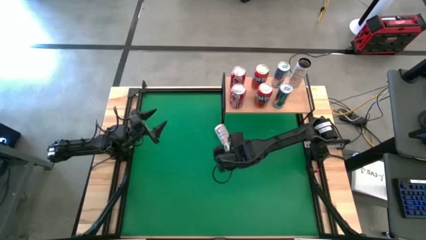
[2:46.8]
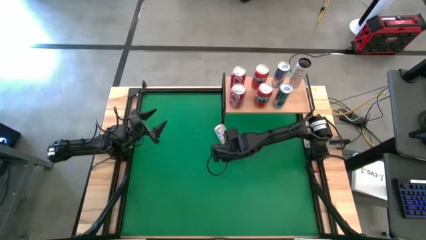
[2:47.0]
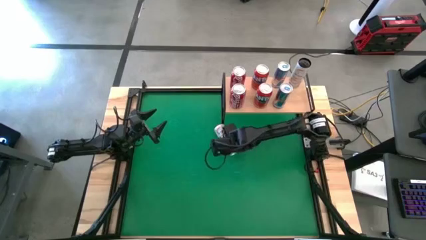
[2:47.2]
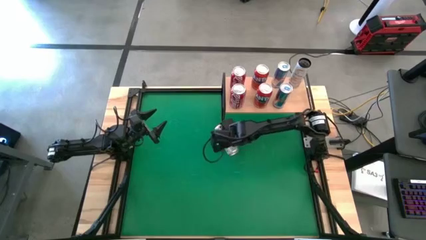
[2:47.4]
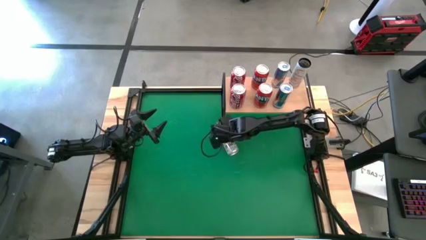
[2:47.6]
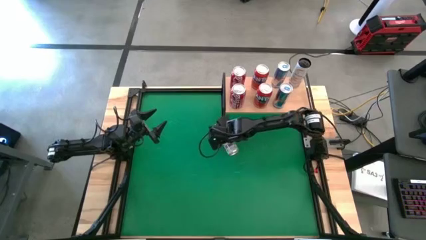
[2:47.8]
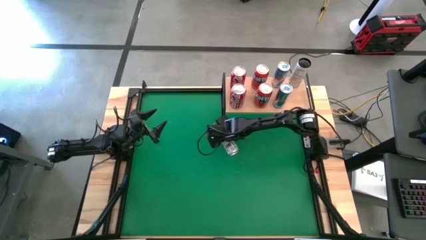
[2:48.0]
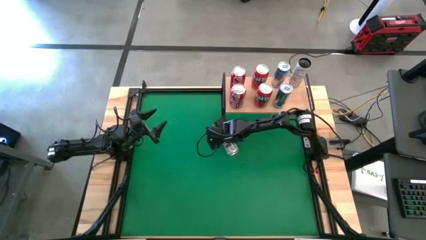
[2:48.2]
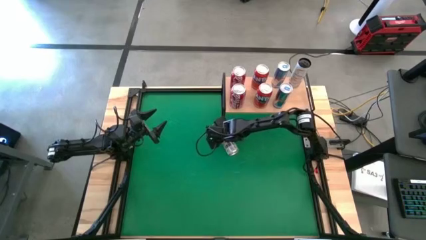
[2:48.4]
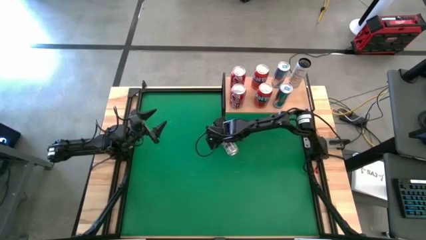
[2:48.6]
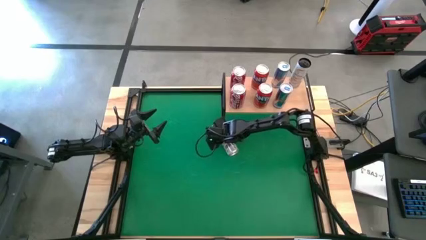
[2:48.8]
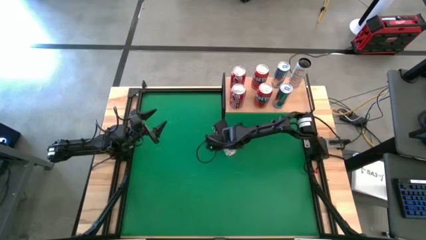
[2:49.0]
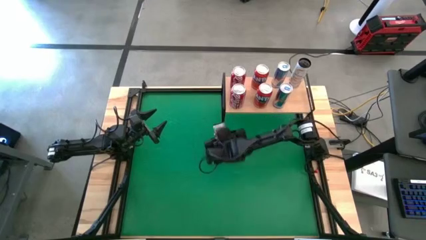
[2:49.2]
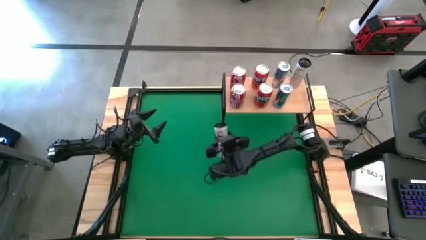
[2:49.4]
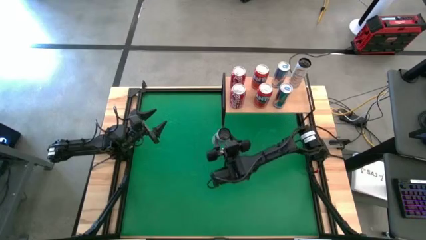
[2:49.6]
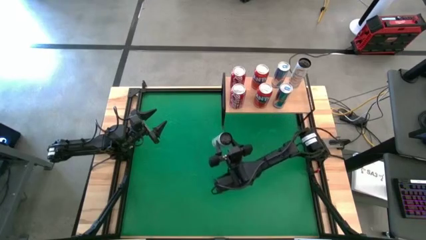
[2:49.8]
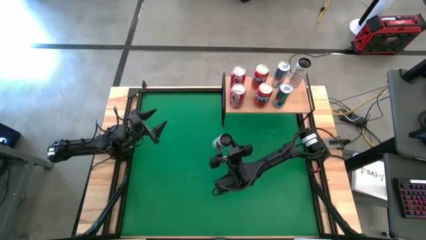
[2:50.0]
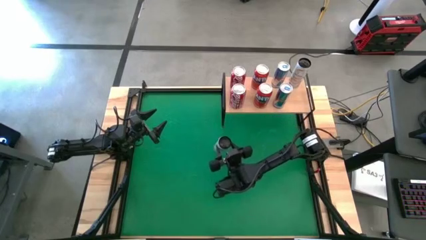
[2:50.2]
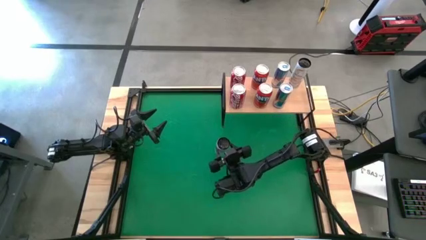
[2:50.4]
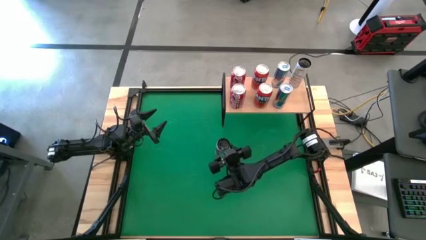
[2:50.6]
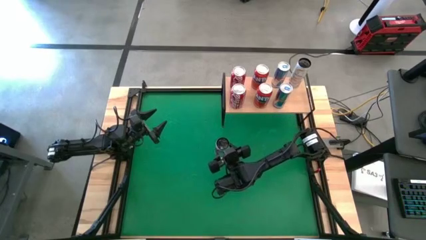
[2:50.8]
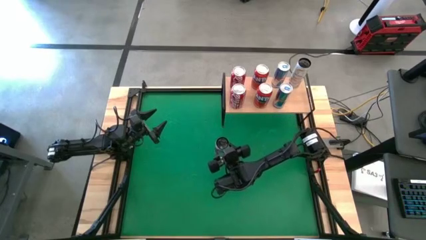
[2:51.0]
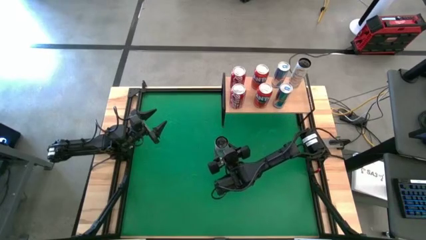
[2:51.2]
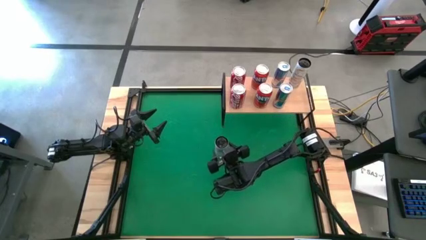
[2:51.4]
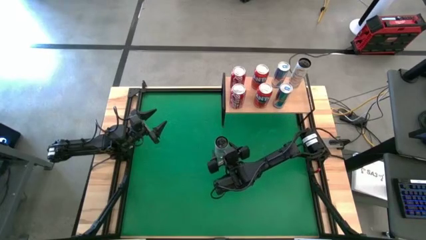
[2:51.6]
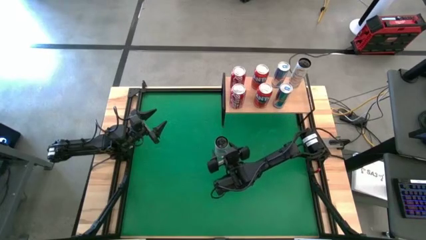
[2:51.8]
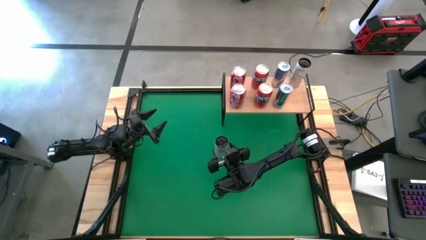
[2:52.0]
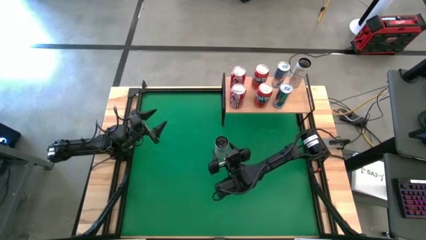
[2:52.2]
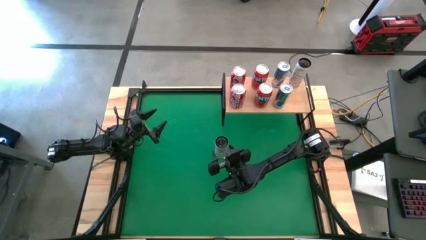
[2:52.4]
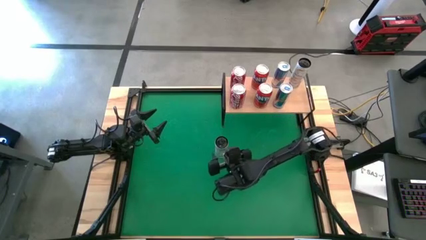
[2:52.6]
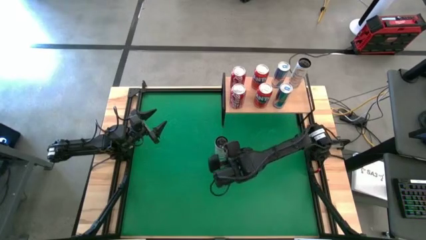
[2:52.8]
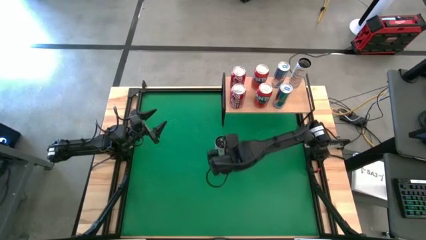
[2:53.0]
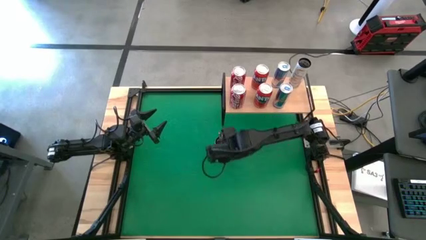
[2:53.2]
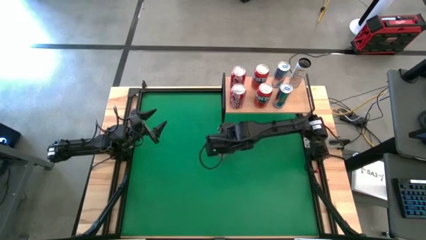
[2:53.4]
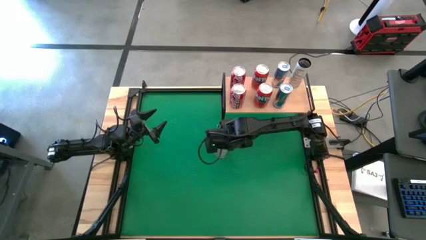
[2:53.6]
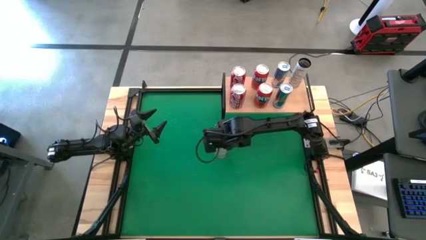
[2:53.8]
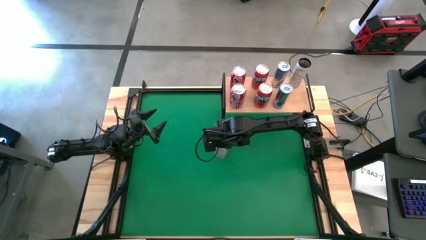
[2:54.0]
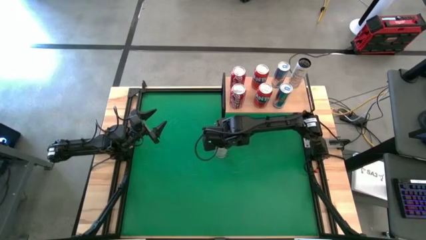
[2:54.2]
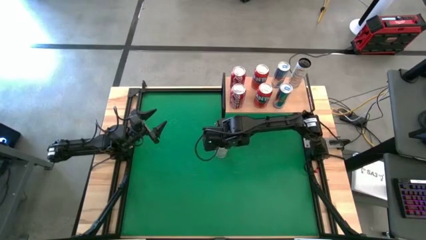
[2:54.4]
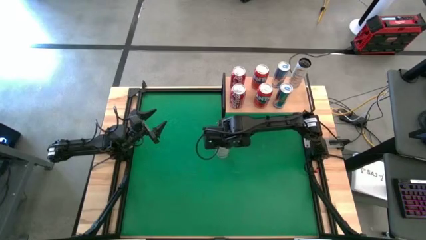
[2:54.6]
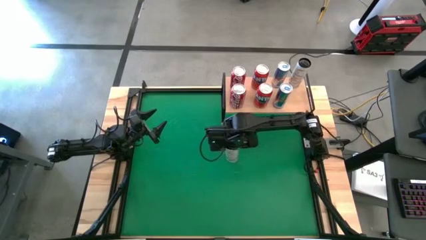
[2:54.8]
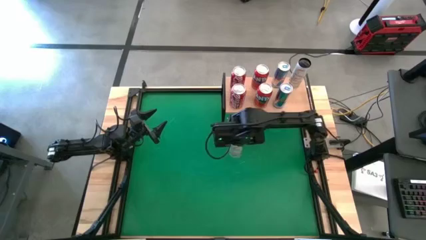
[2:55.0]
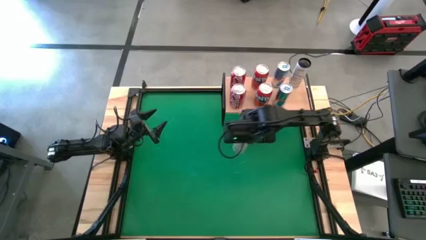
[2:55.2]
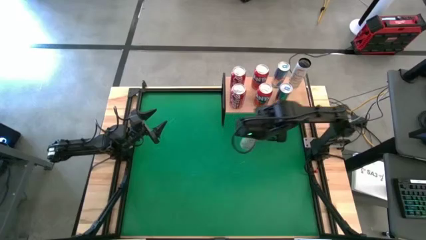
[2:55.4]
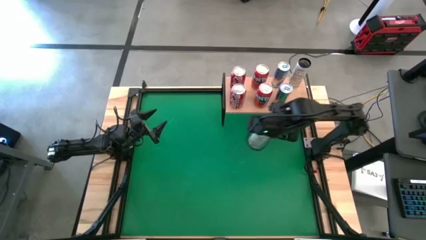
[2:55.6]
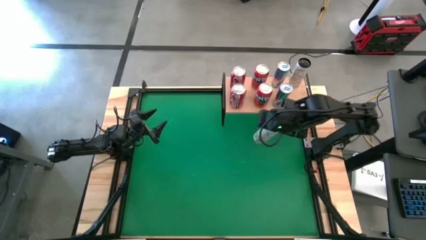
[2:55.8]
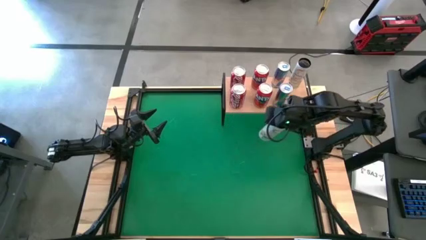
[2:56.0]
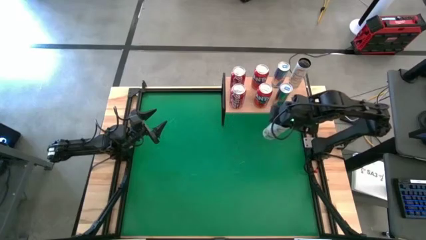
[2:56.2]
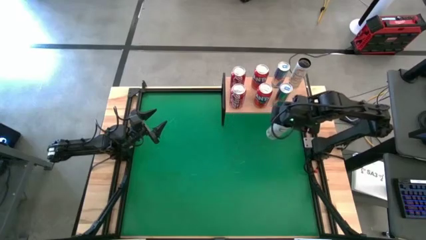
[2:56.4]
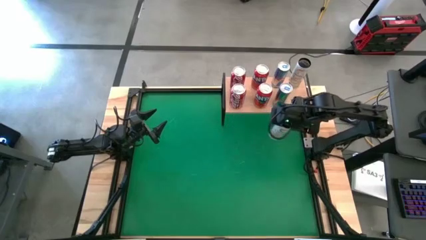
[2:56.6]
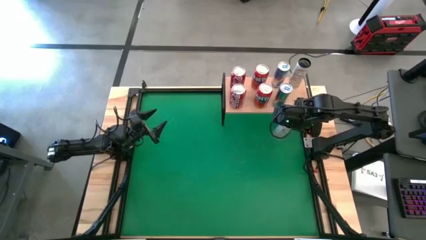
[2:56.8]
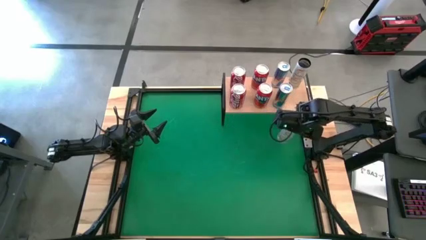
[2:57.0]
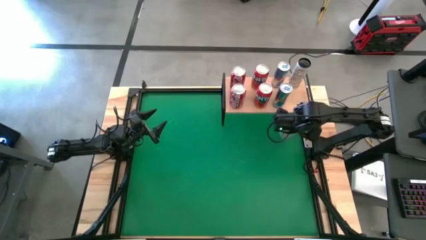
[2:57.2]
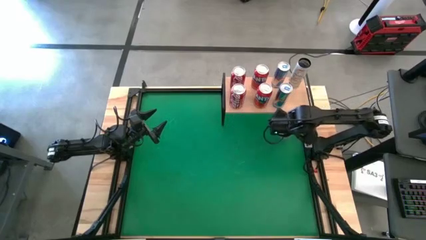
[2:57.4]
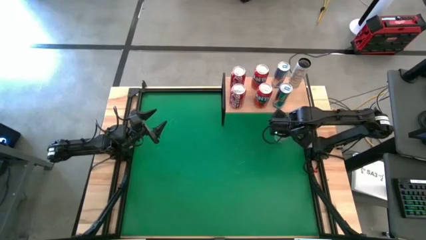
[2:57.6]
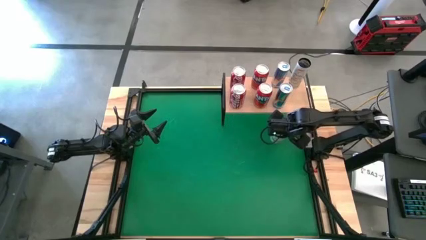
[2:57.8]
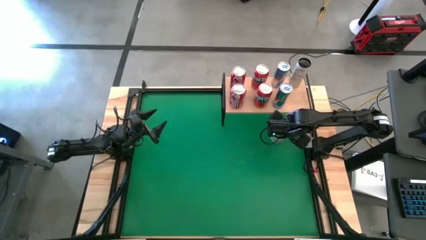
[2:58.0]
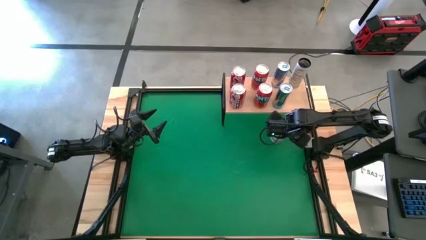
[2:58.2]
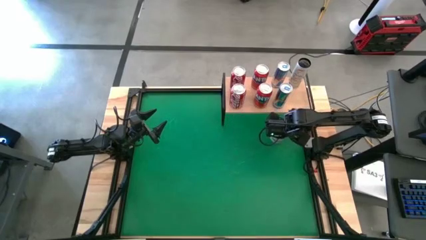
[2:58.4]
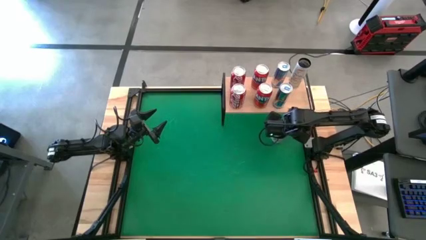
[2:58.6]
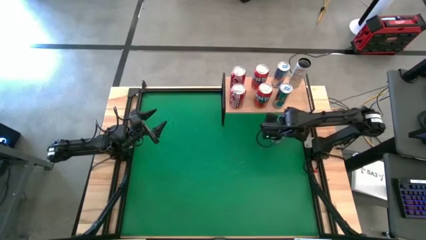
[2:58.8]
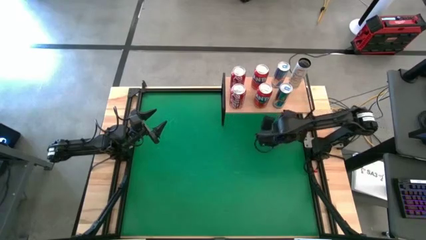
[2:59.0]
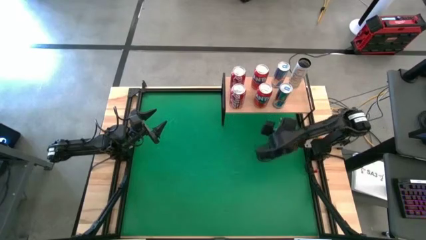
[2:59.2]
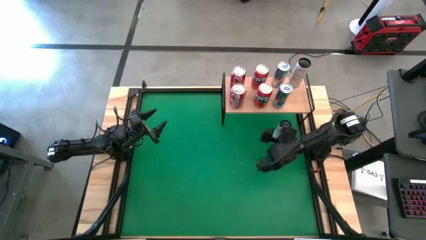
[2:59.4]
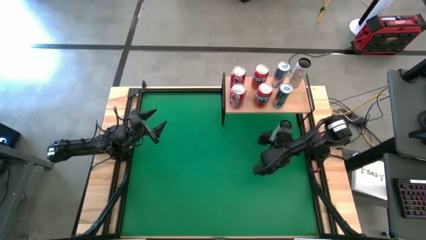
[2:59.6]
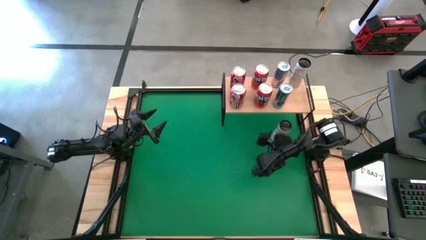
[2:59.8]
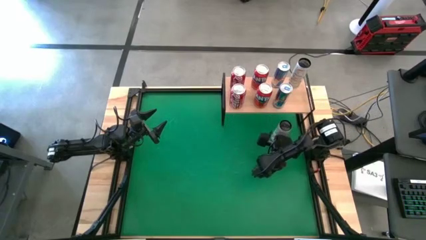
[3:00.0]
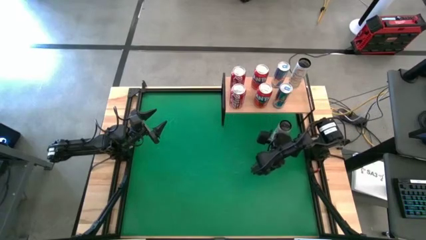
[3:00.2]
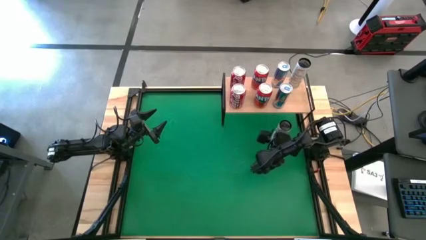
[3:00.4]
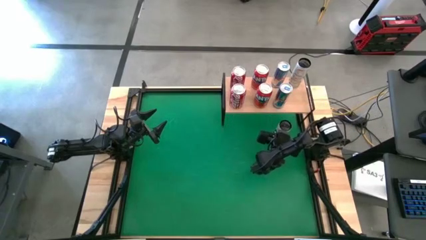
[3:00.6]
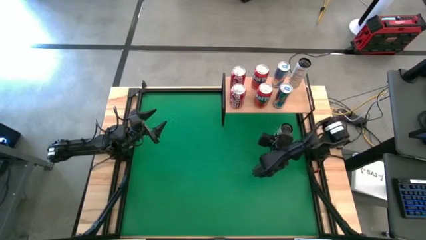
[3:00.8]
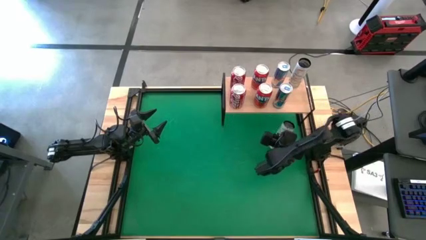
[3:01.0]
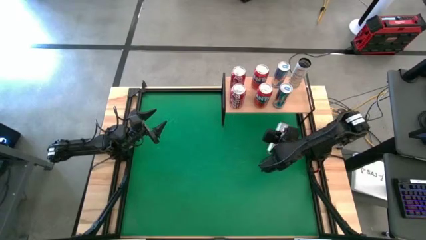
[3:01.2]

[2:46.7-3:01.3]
Task: Place canned beverage on shelf
Put the white yellow soda can on the shelf aligned with the other white yellow soda can
